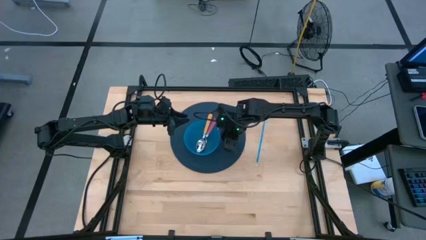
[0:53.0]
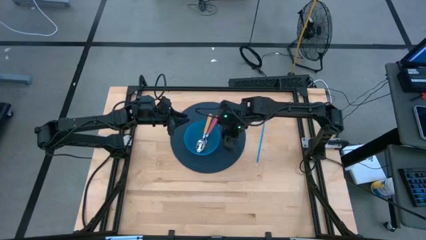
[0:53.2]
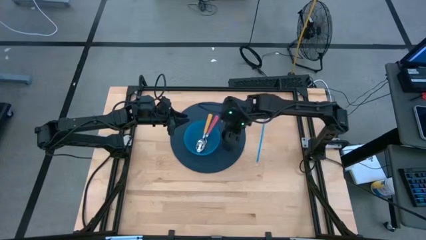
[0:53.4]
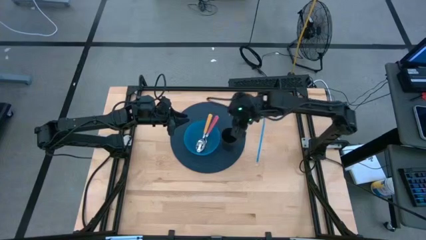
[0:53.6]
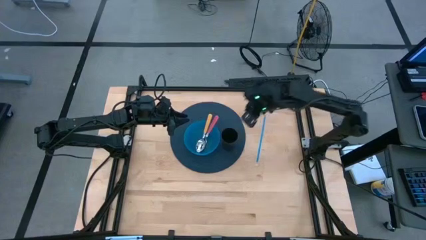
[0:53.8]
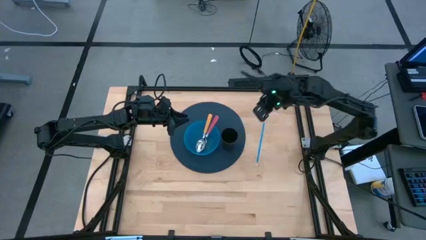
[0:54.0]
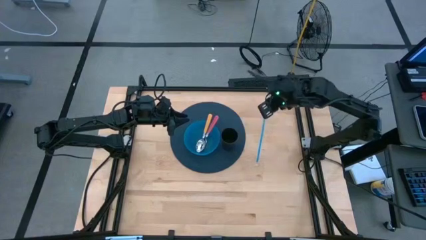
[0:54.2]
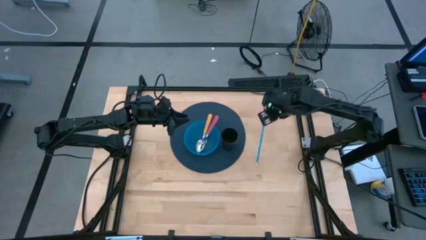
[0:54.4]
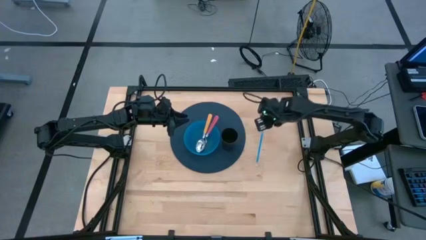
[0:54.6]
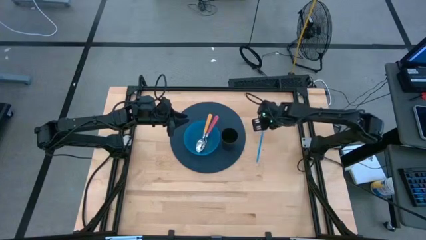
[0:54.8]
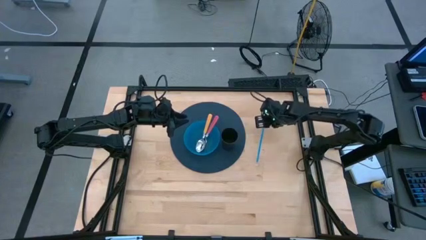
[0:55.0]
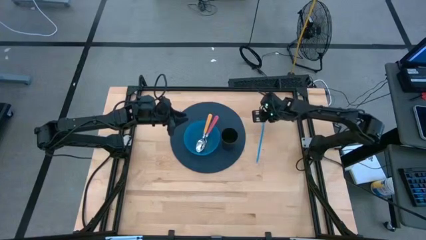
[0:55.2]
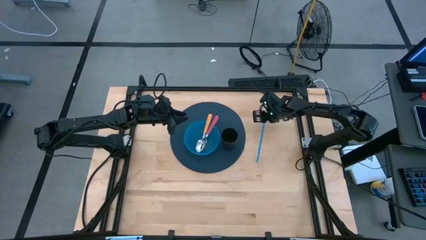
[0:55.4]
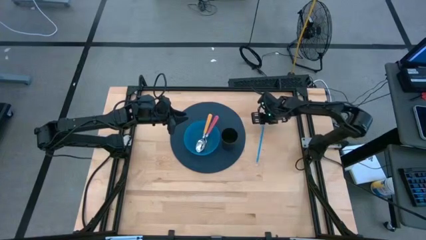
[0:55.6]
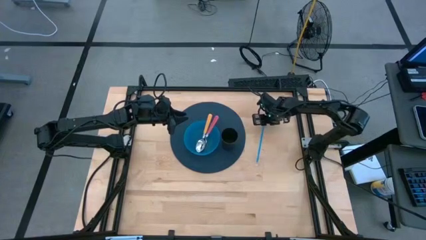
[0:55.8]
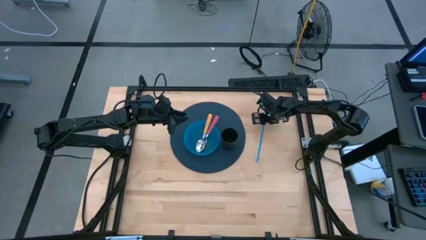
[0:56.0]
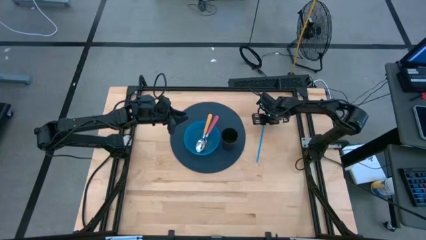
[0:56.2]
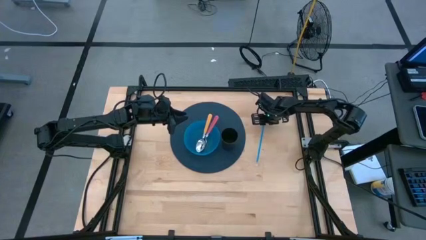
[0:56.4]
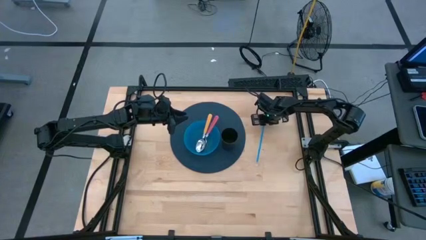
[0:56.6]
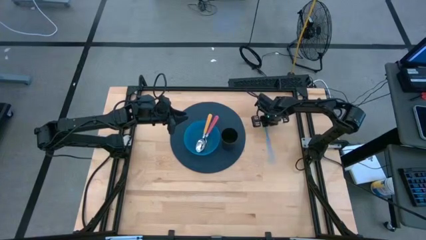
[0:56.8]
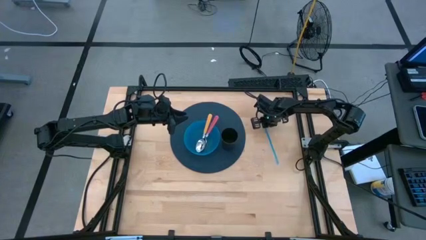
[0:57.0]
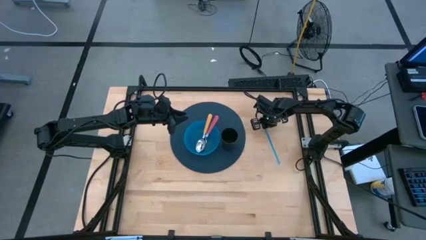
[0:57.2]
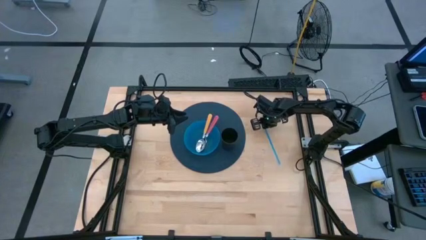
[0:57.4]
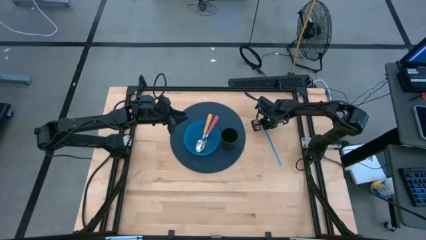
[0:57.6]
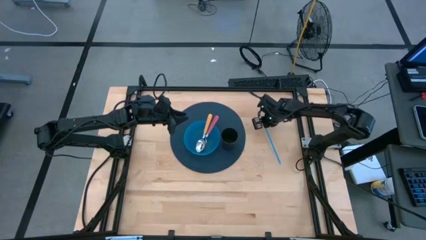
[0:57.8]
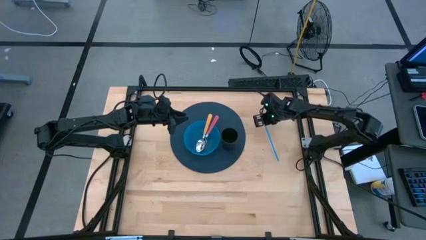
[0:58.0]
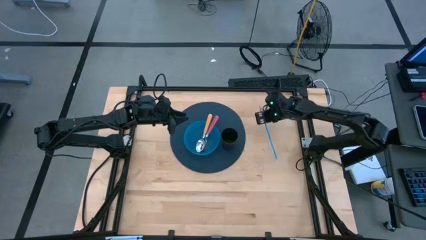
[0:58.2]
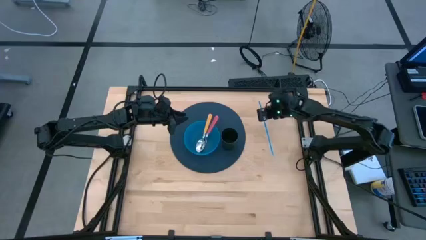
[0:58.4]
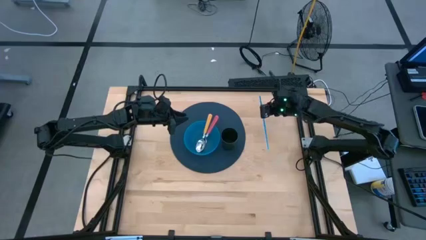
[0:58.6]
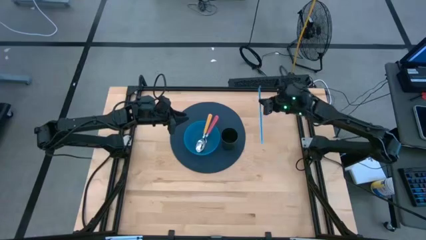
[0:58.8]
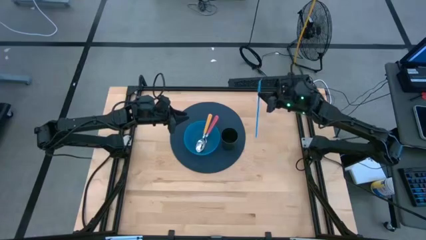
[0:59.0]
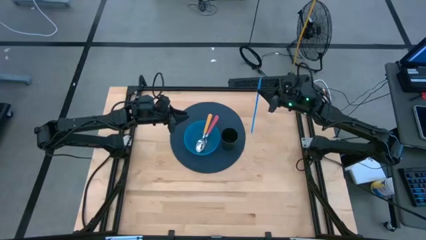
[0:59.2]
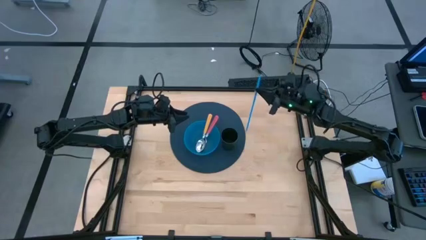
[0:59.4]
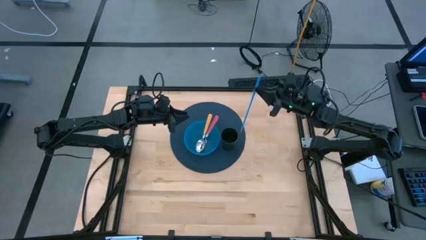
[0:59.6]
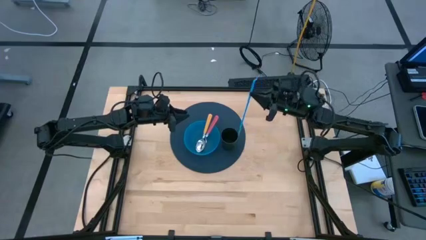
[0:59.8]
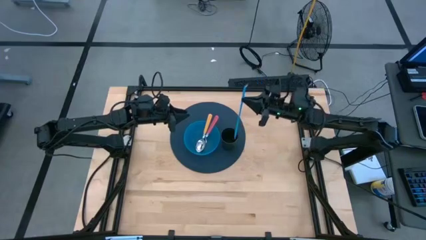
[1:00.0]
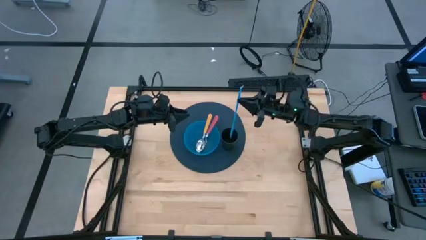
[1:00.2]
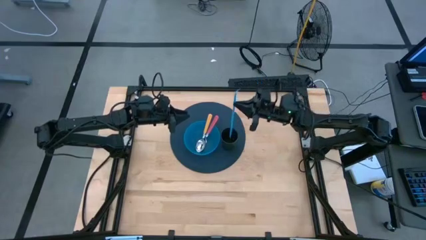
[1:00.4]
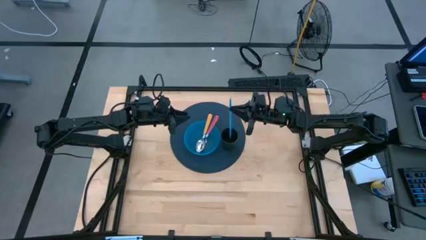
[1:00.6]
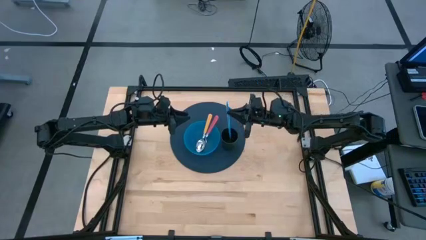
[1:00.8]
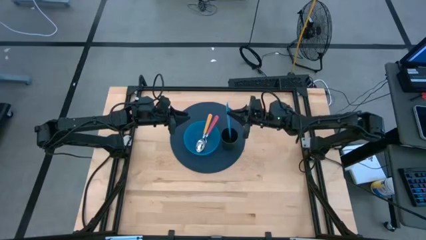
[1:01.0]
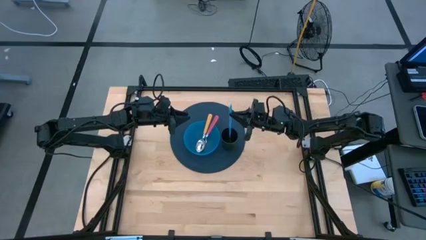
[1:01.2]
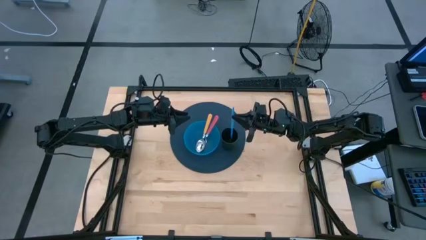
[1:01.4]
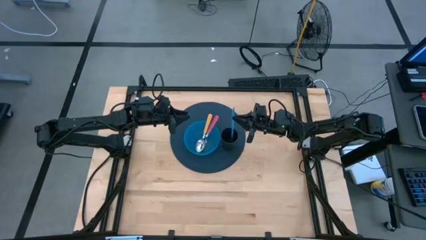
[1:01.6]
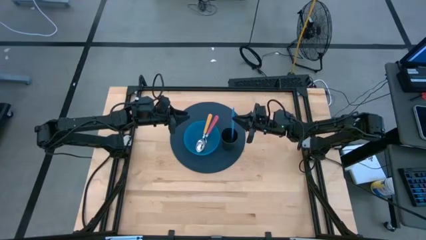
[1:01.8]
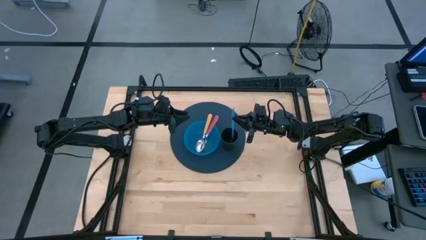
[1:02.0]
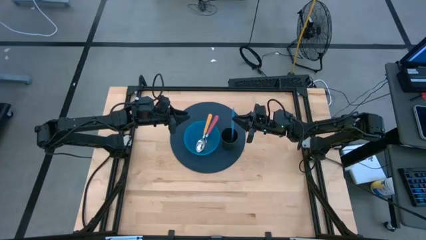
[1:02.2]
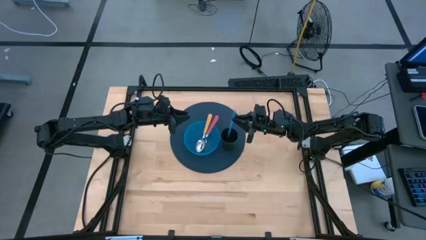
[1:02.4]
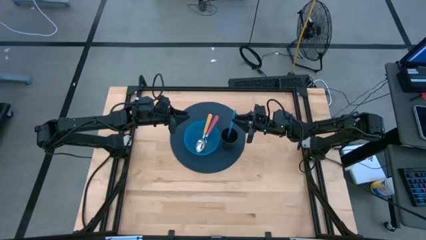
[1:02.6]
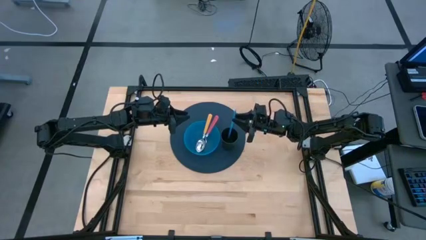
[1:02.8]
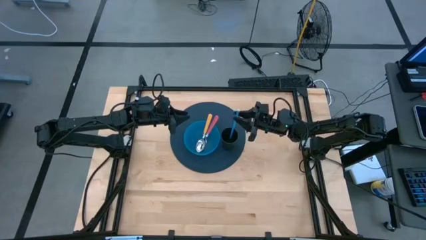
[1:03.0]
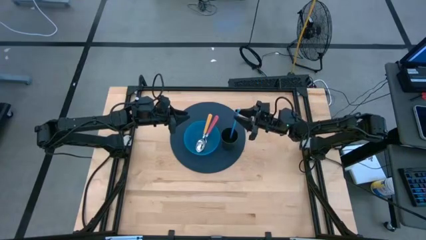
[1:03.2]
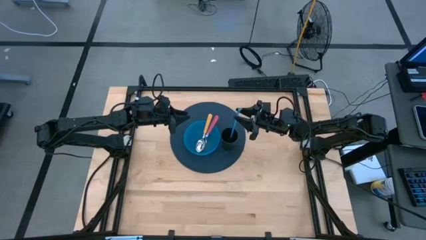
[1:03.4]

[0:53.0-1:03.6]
Task: Pick & Place Utensil
Put the blue straw into the black cup on the blue mat

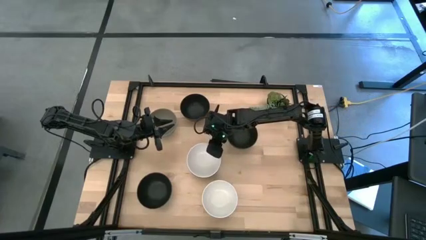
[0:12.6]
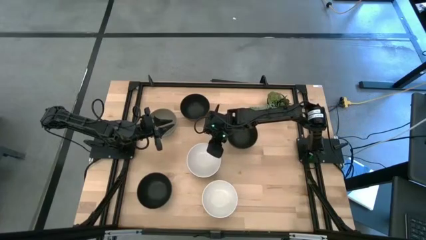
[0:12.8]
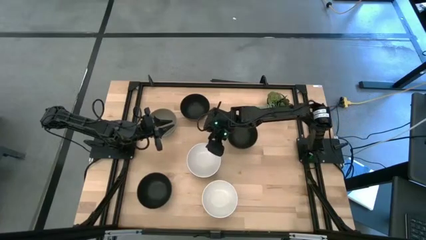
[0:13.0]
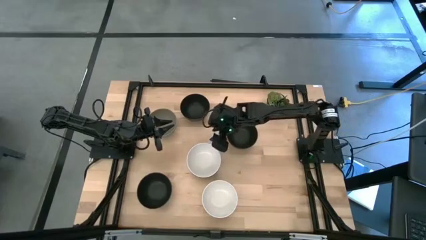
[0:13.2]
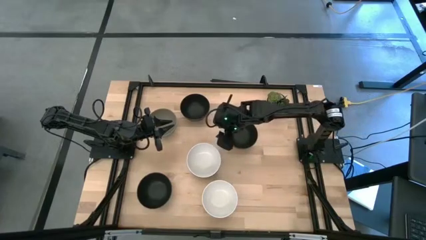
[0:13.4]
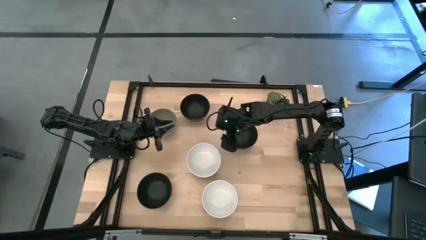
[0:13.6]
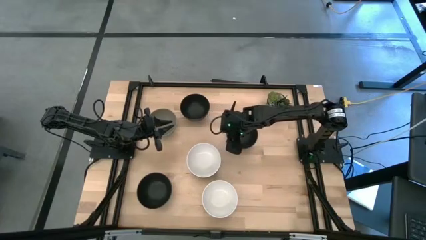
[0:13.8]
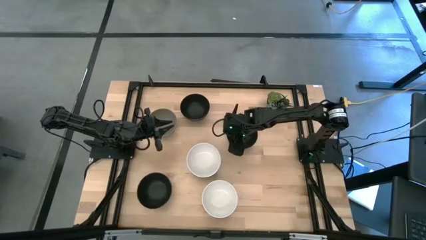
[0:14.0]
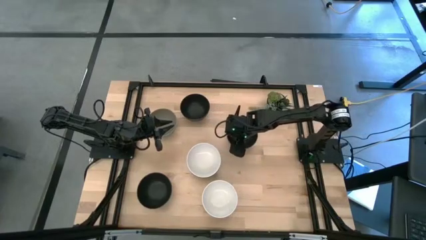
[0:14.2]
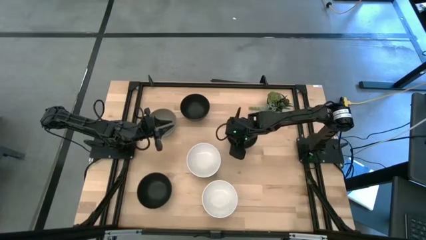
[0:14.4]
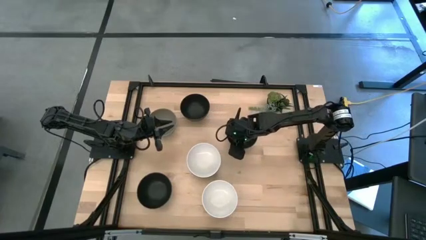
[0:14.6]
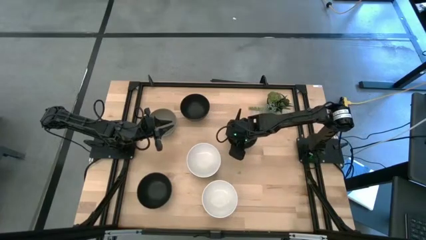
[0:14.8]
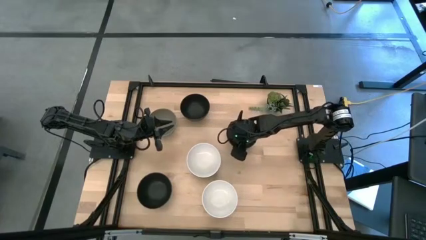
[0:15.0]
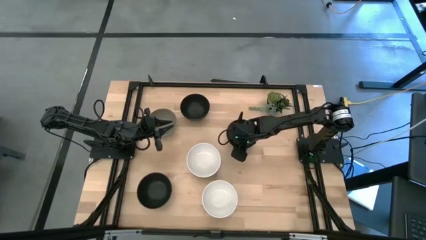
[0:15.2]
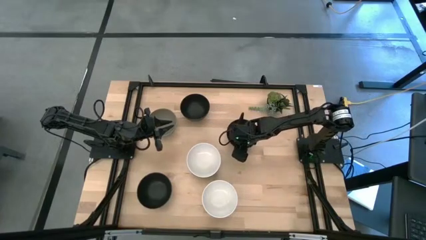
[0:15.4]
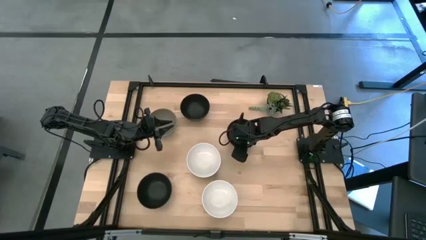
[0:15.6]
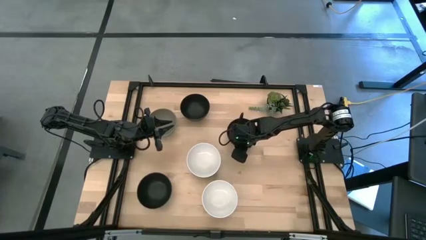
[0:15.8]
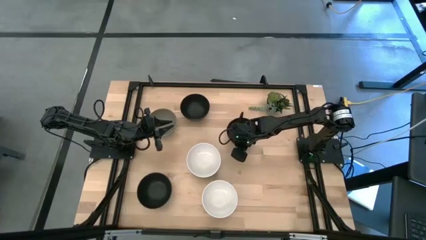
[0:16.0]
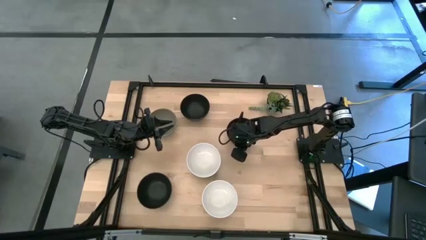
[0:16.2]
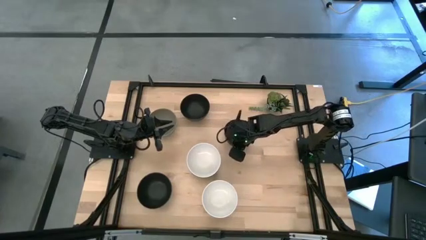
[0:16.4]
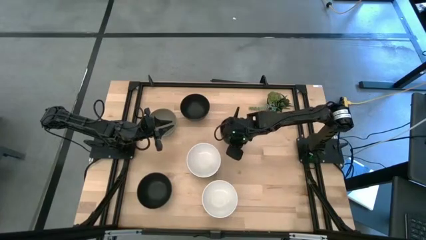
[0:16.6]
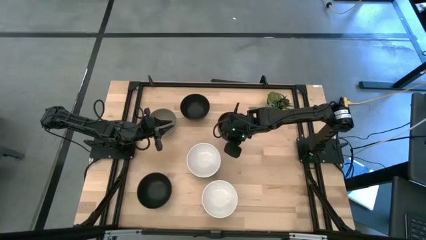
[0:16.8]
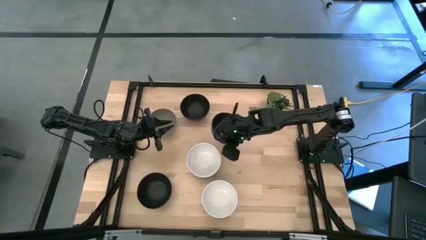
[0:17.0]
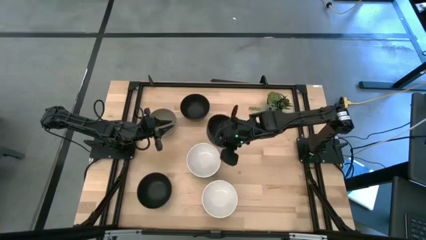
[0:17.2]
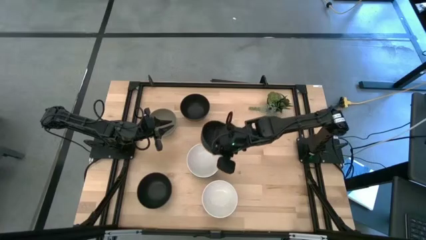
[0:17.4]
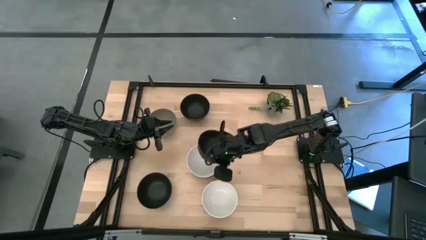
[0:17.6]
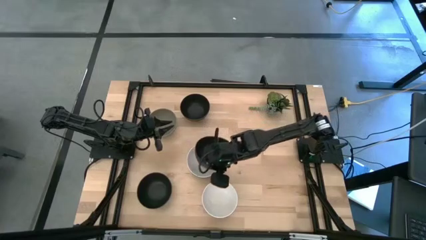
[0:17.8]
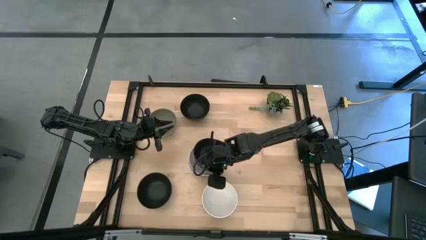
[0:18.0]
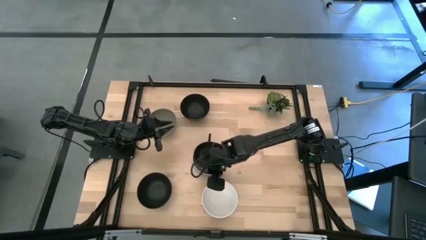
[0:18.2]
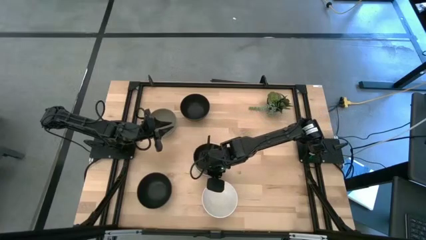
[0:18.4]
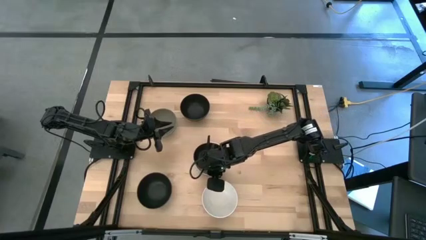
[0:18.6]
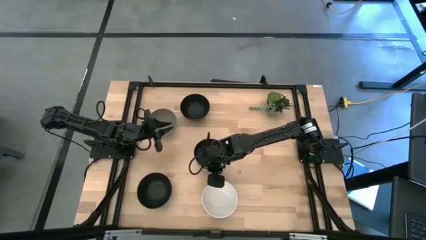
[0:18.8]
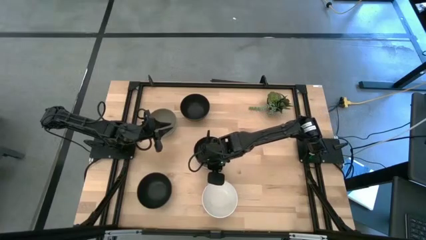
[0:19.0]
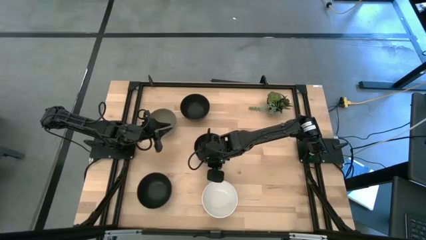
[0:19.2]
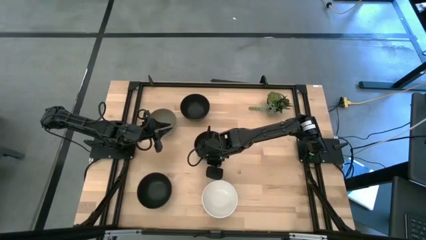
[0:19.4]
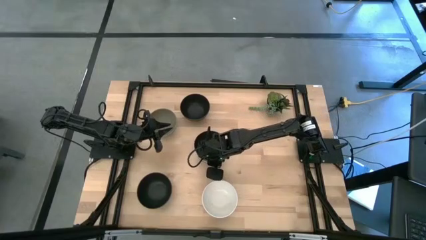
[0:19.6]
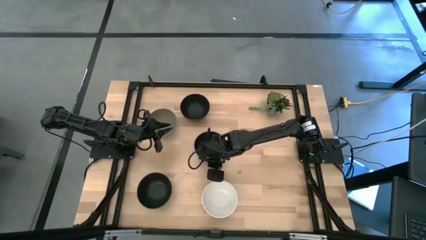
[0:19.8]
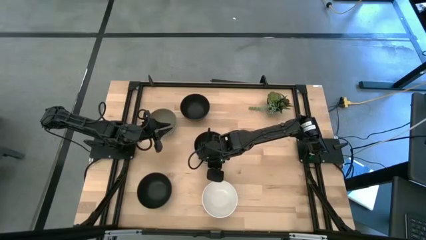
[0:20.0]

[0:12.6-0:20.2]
Task: Nest bowls inside each other
Stack the black bowl on top of the white bowl
